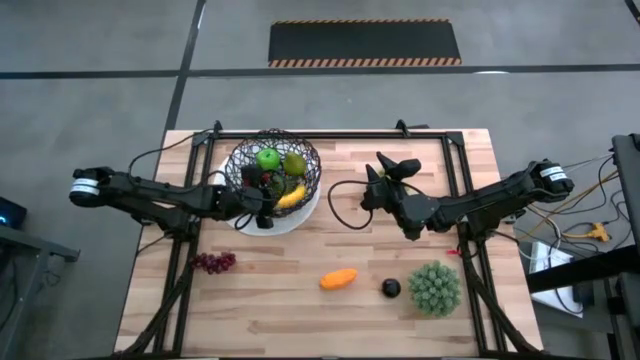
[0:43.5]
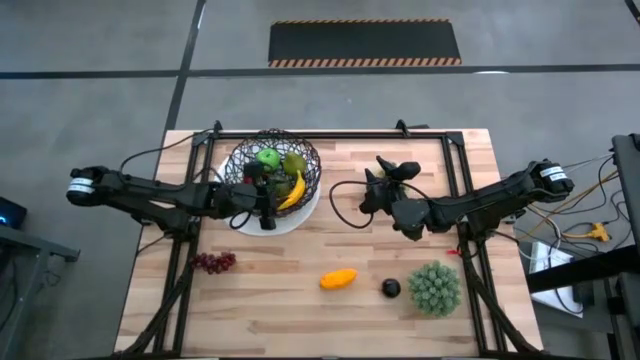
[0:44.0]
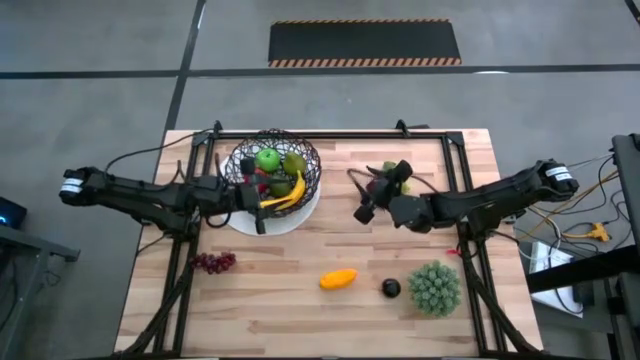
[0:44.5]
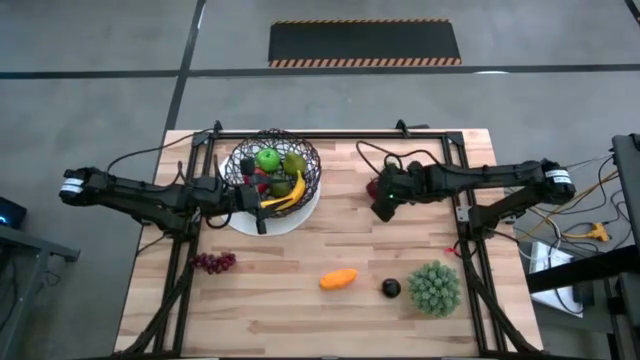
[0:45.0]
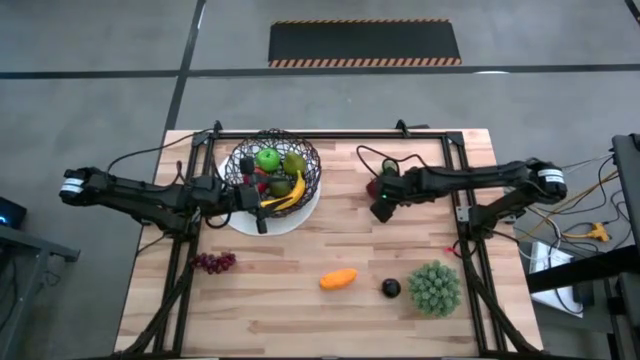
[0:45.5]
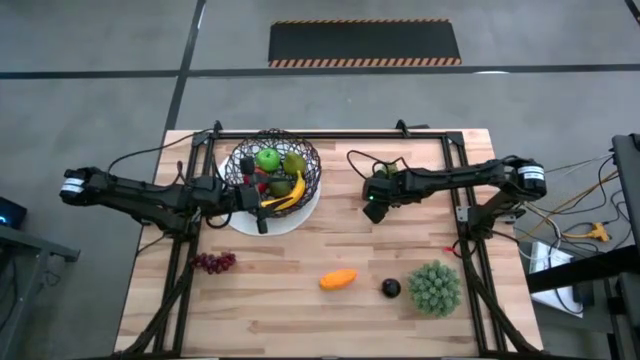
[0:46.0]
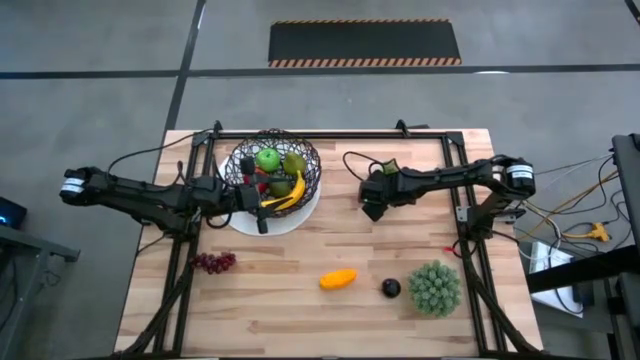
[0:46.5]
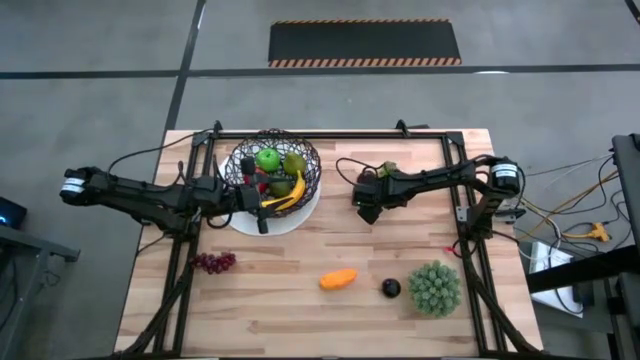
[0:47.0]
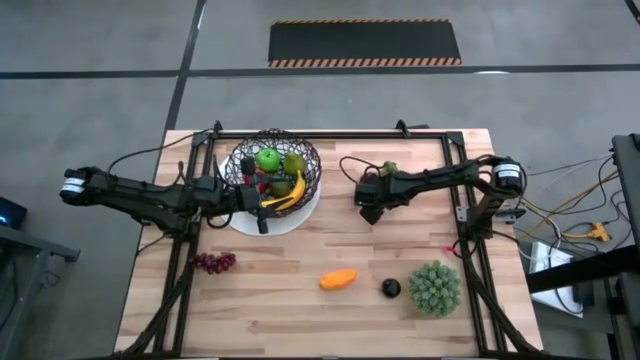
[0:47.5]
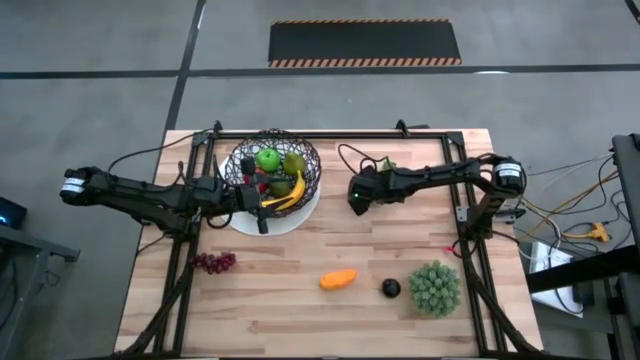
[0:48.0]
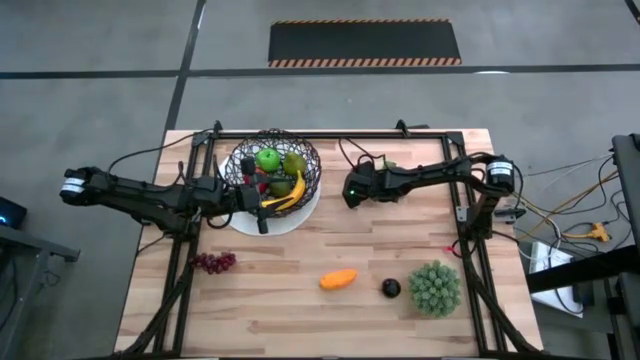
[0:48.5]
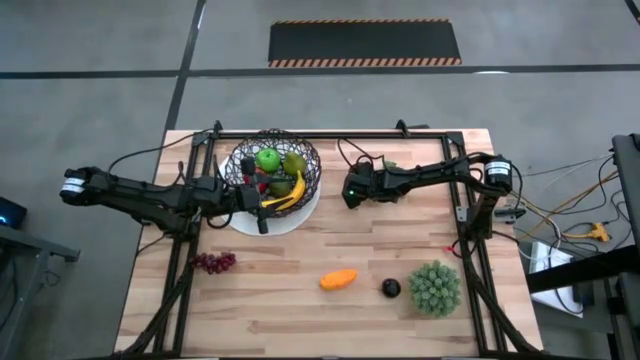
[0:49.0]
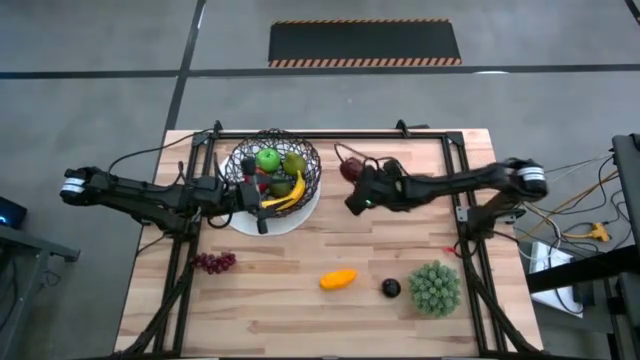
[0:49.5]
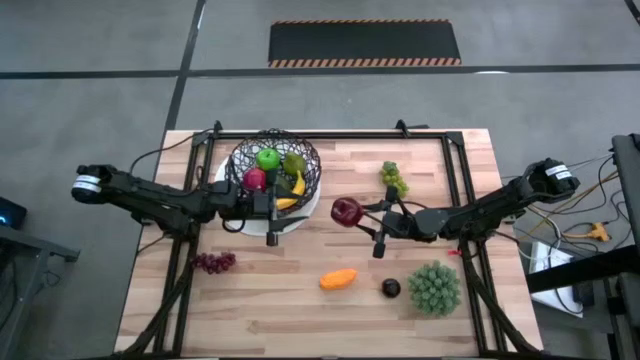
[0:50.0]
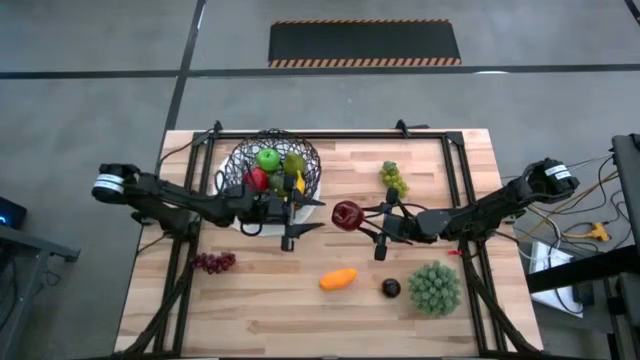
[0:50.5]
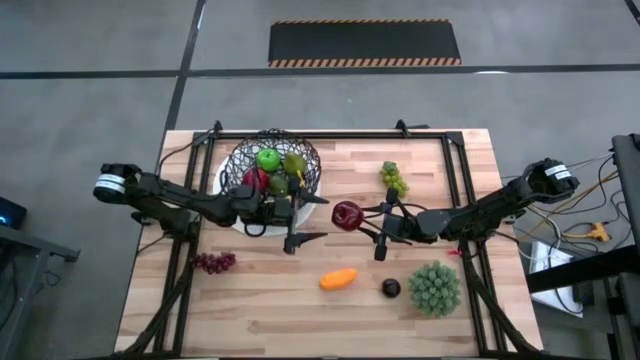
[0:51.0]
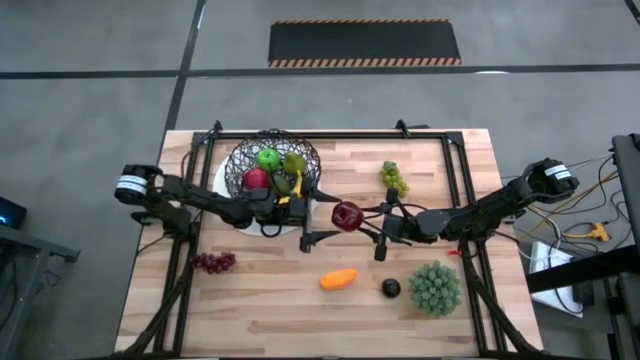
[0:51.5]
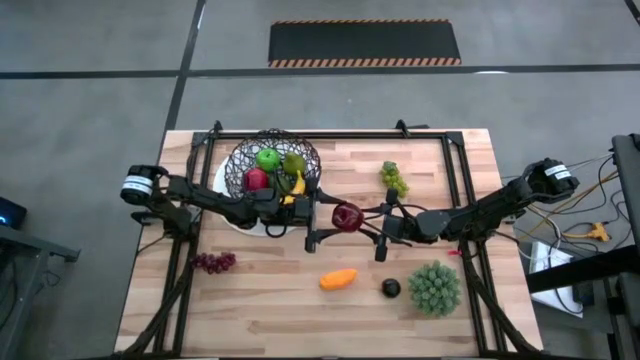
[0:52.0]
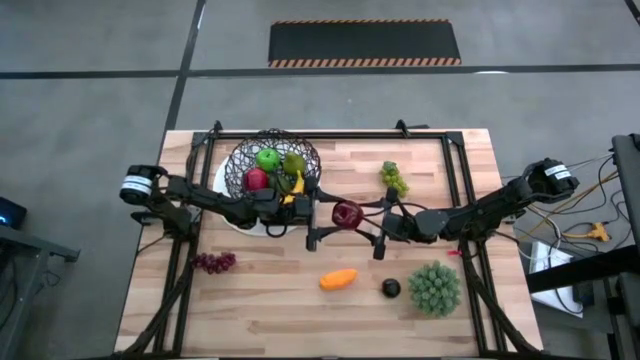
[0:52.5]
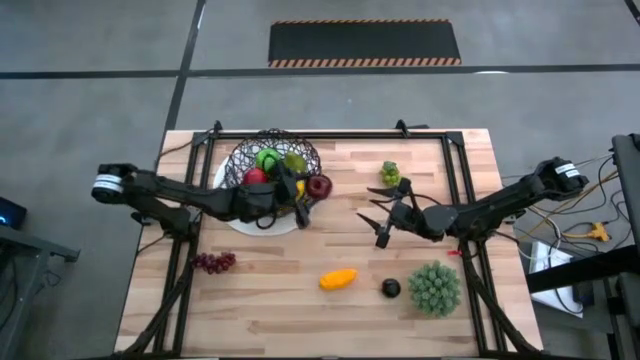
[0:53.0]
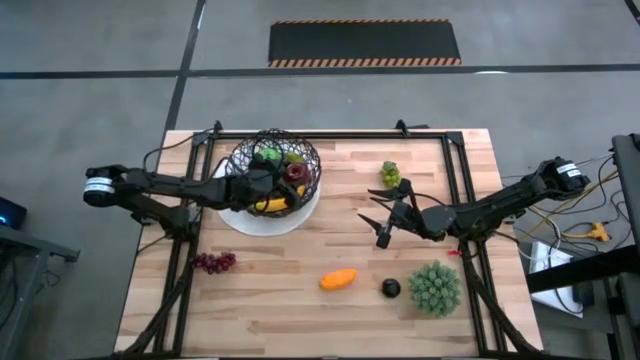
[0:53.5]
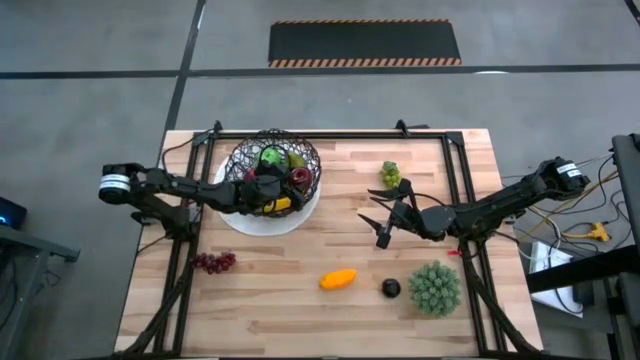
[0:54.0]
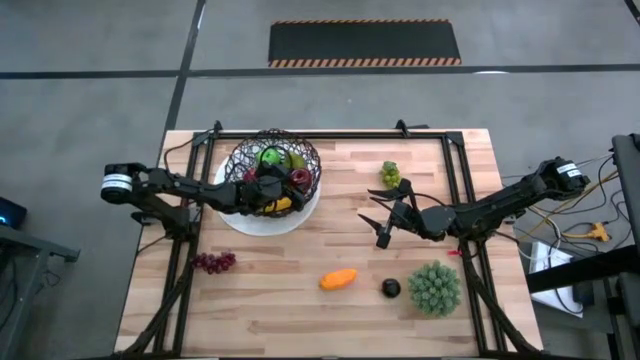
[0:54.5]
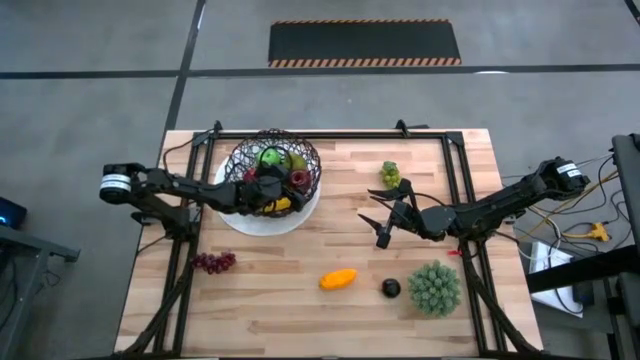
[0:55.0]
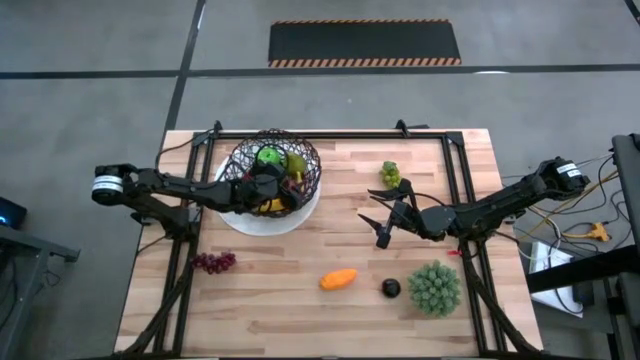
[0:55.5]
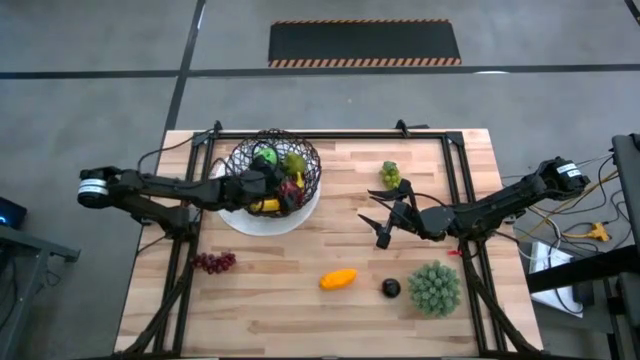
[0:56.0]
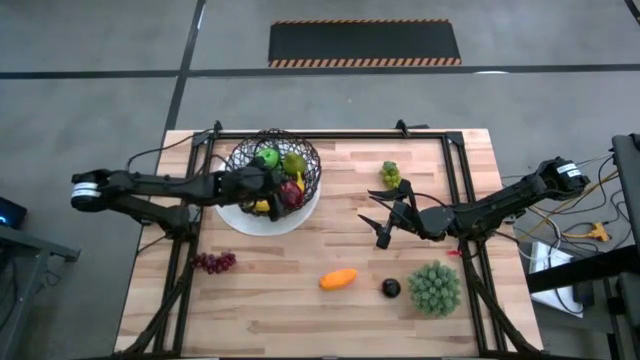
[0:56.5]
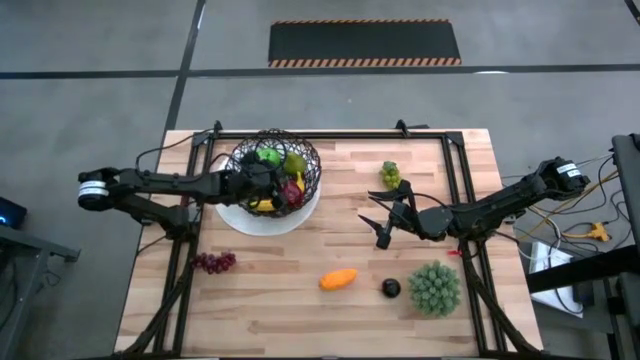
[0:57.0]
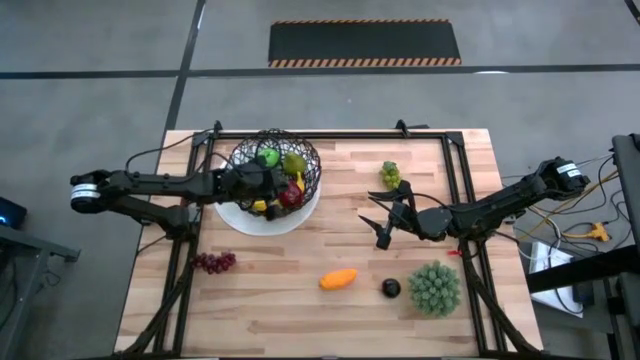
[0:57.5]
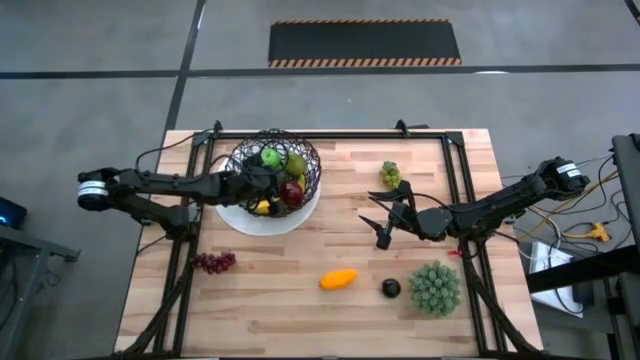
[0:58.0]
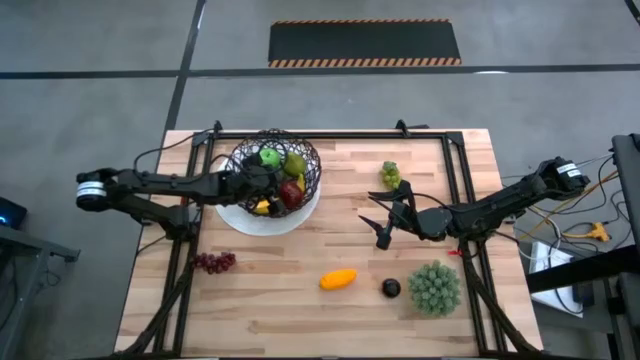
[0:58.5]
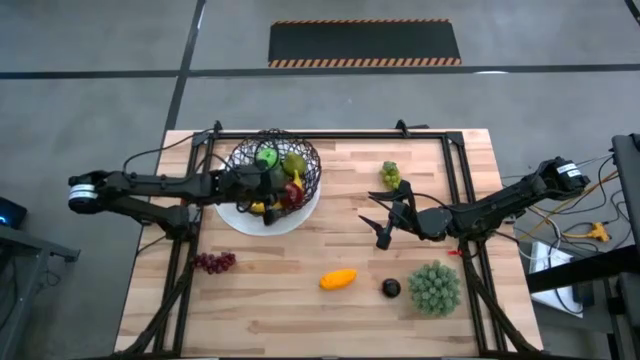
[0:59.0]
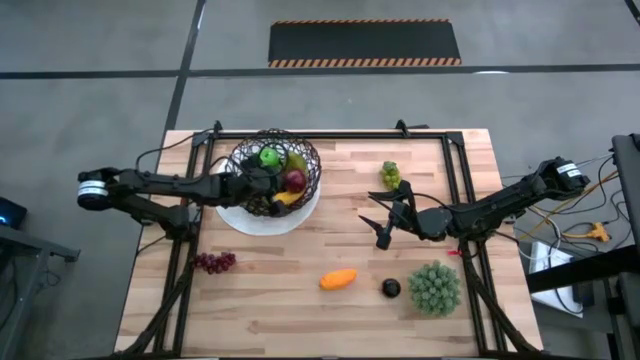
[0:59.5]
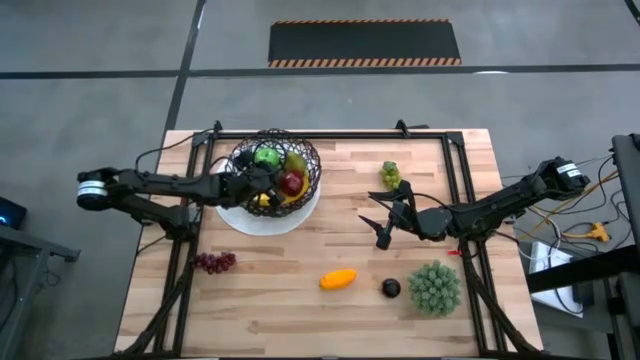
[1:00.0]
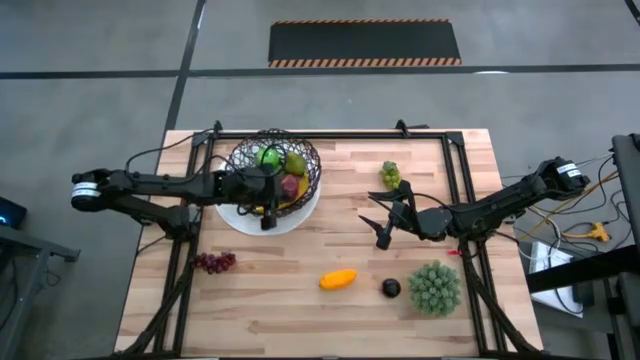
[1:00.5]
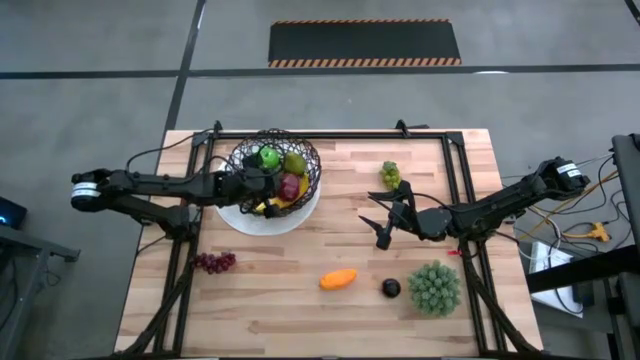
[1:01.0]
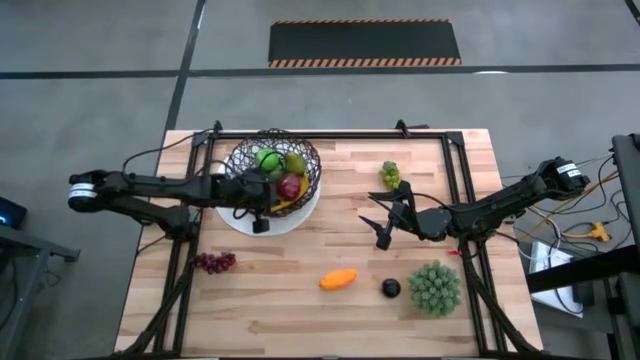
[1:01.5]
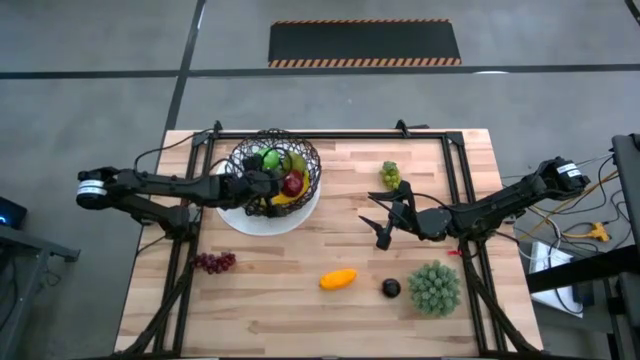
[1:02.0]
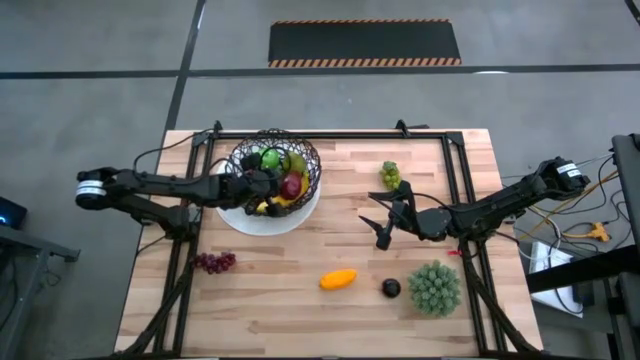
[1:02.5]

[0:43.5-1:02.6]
Task: Build produce basket
Put the red apple into the woven basket

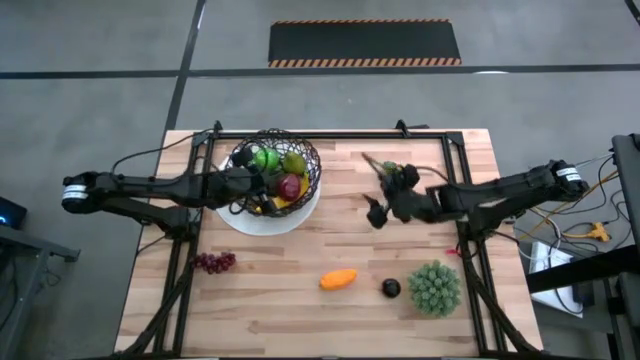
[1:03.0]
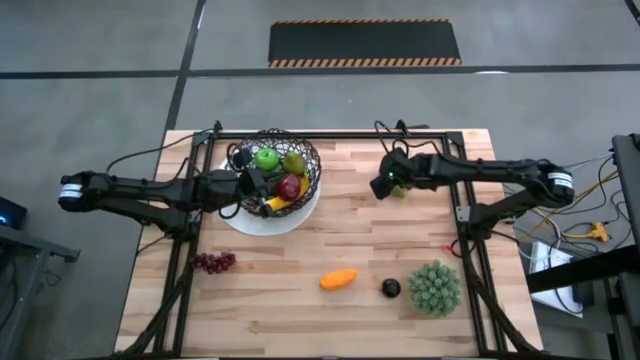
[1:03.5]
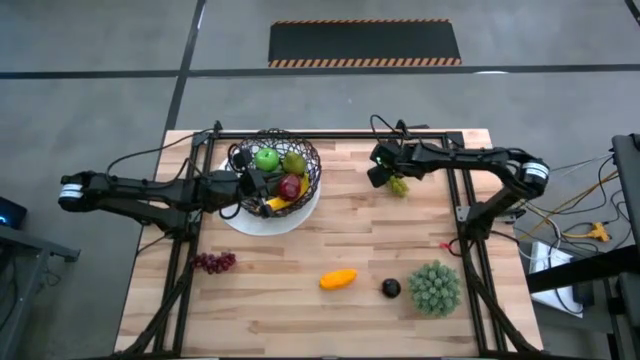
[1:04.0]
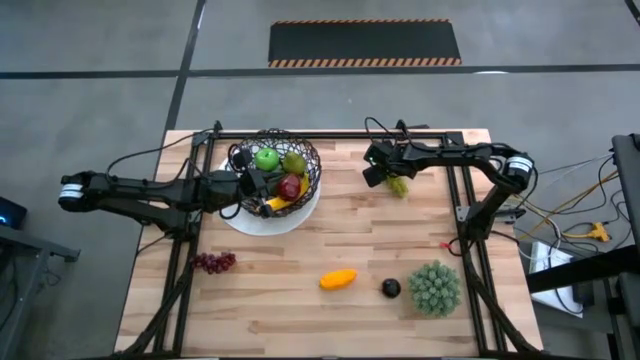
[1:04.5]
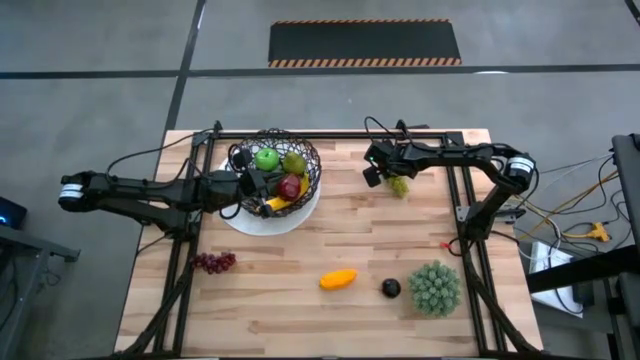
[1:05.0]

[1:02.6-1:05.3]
Put the green grapes into the woven basket
